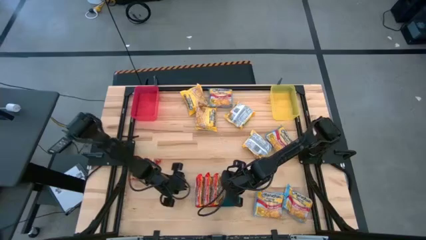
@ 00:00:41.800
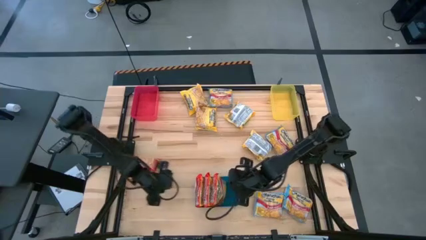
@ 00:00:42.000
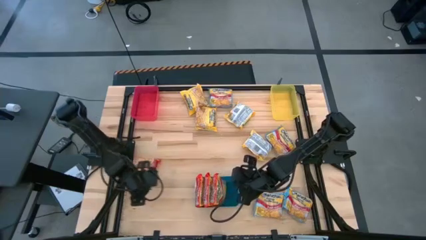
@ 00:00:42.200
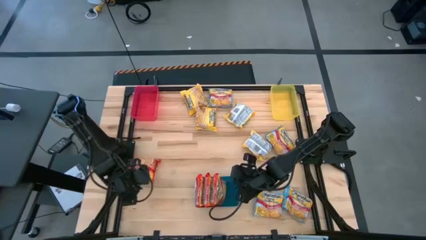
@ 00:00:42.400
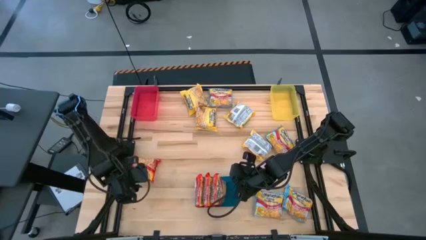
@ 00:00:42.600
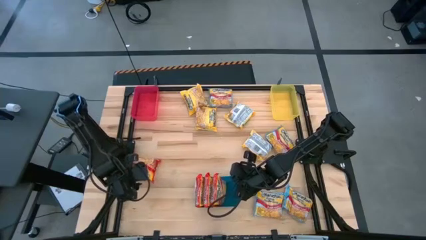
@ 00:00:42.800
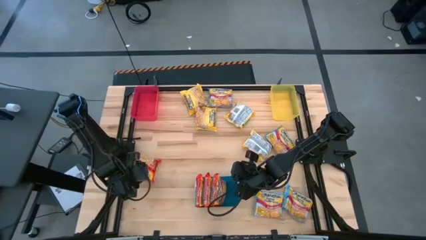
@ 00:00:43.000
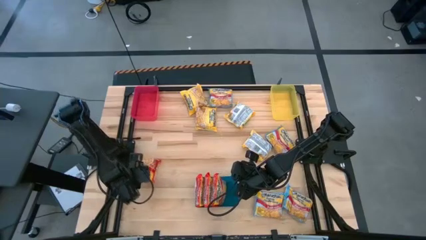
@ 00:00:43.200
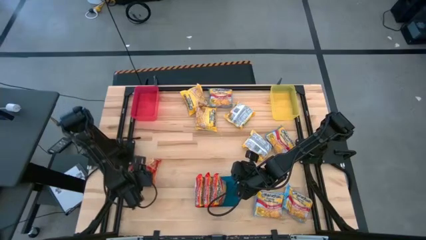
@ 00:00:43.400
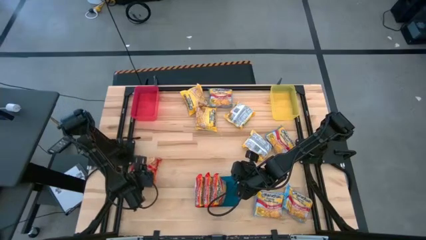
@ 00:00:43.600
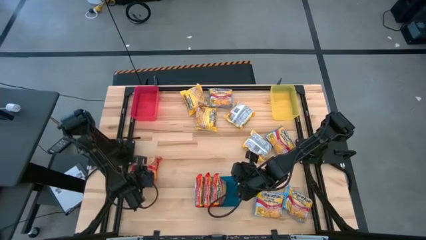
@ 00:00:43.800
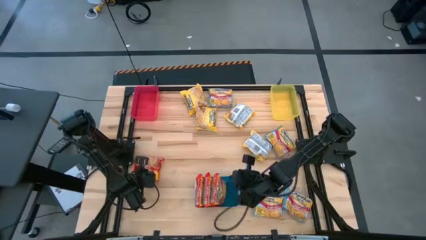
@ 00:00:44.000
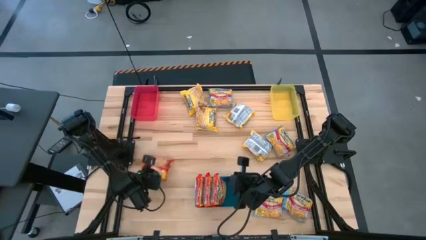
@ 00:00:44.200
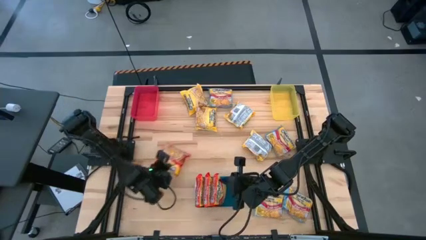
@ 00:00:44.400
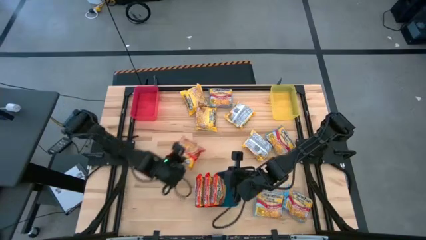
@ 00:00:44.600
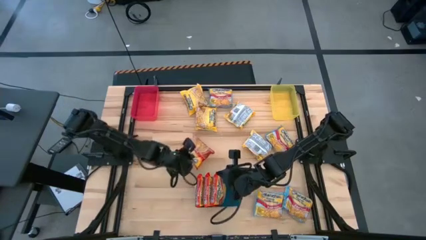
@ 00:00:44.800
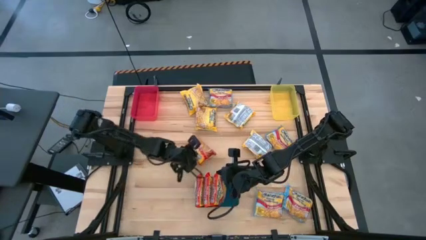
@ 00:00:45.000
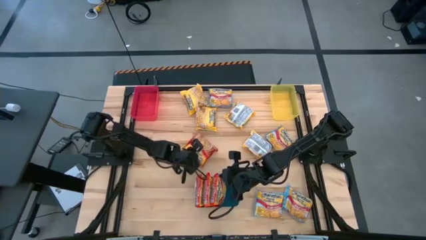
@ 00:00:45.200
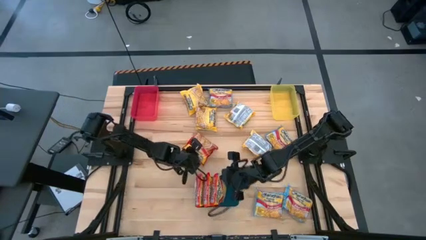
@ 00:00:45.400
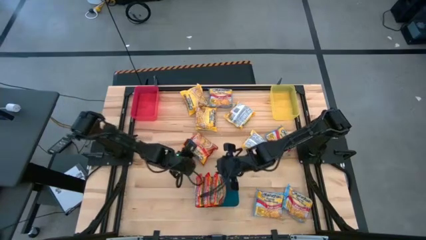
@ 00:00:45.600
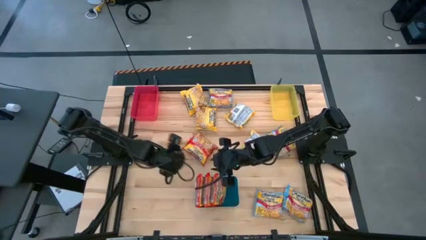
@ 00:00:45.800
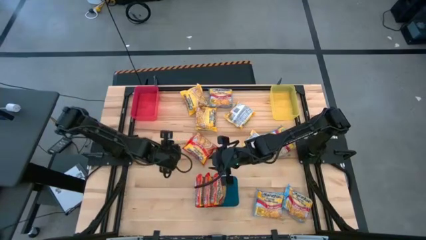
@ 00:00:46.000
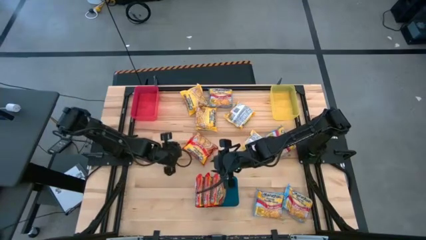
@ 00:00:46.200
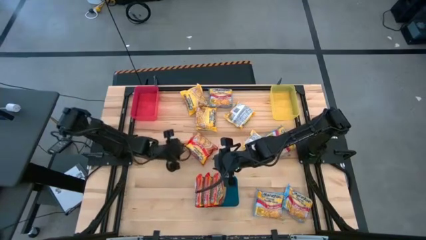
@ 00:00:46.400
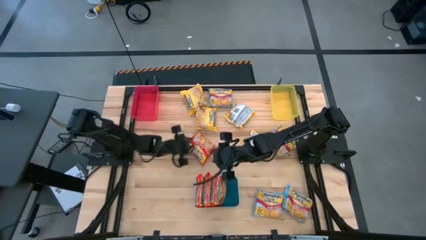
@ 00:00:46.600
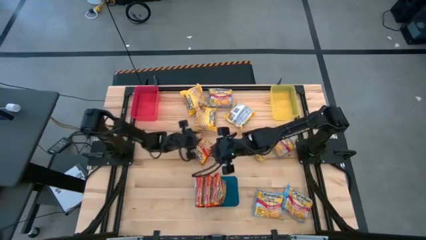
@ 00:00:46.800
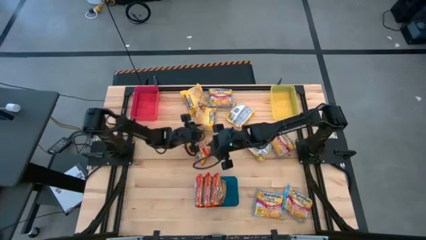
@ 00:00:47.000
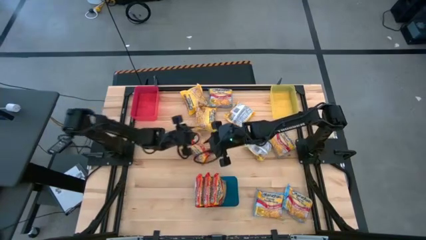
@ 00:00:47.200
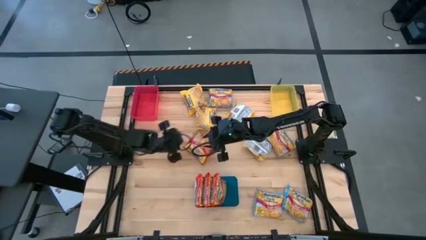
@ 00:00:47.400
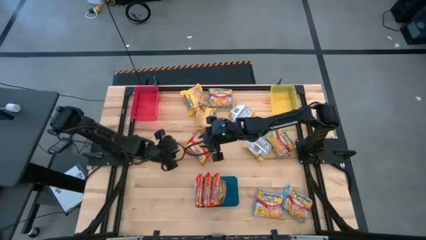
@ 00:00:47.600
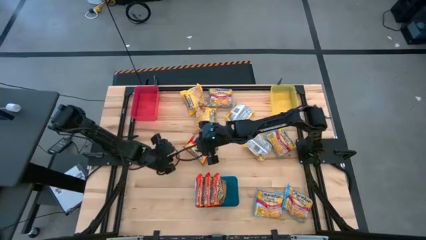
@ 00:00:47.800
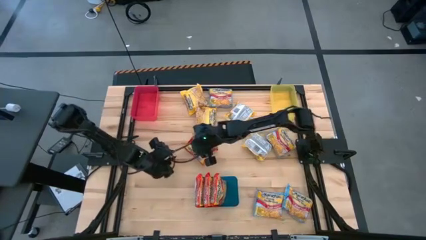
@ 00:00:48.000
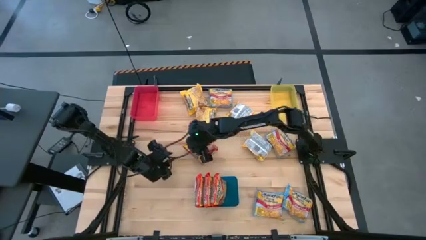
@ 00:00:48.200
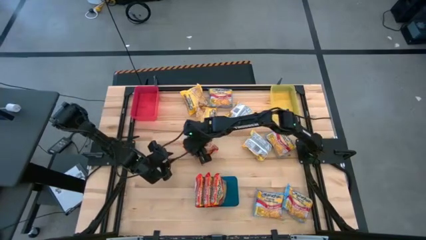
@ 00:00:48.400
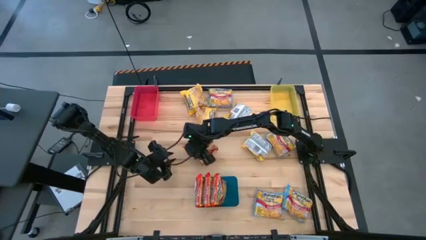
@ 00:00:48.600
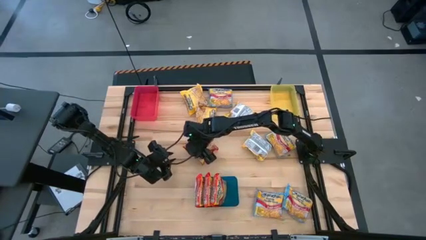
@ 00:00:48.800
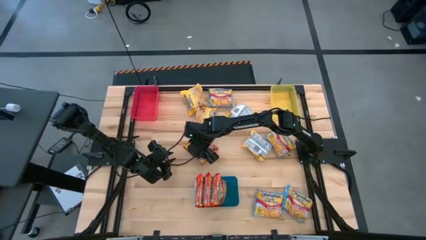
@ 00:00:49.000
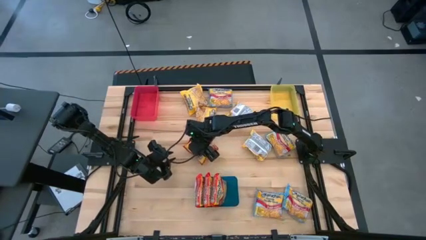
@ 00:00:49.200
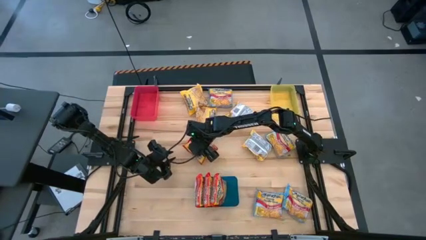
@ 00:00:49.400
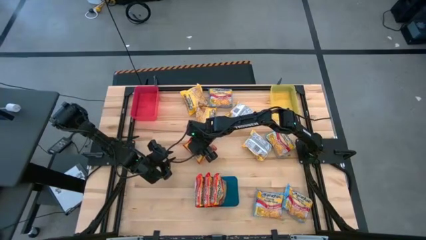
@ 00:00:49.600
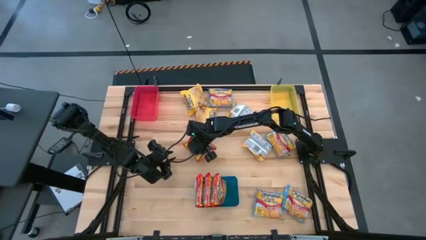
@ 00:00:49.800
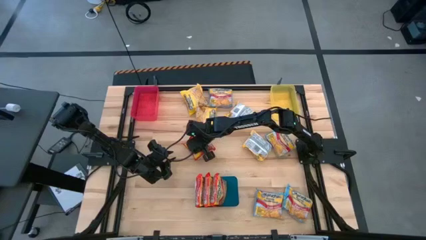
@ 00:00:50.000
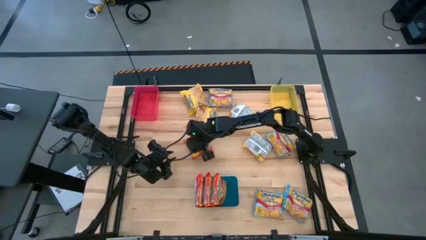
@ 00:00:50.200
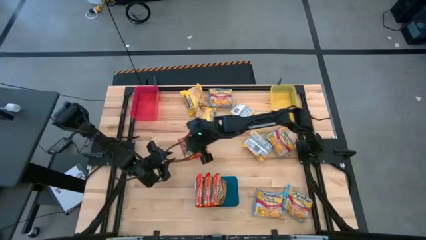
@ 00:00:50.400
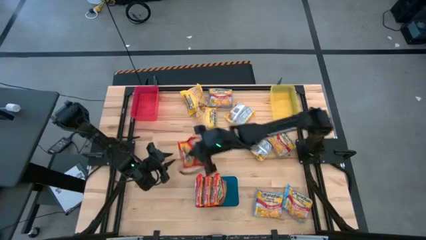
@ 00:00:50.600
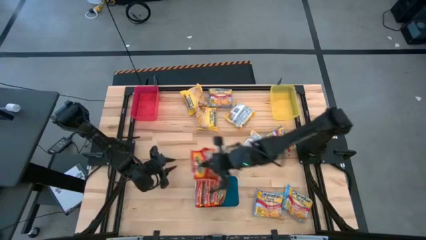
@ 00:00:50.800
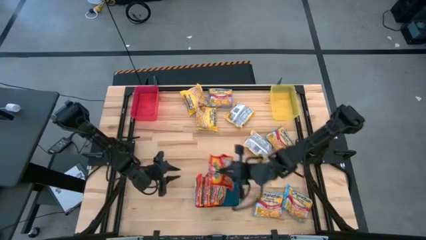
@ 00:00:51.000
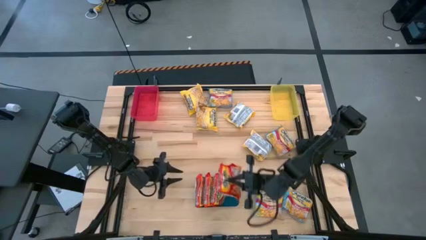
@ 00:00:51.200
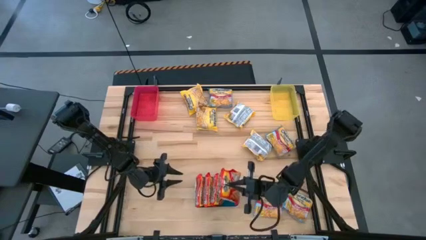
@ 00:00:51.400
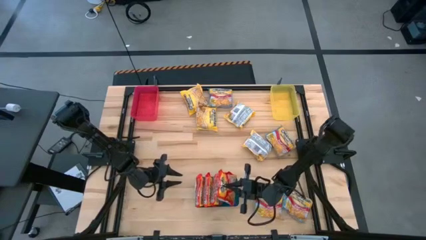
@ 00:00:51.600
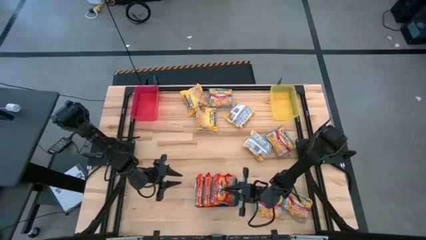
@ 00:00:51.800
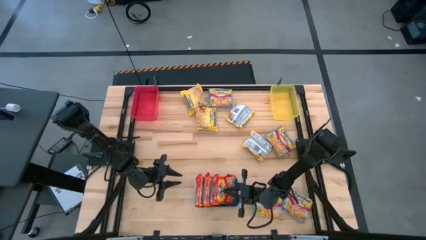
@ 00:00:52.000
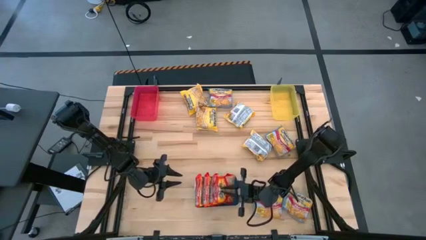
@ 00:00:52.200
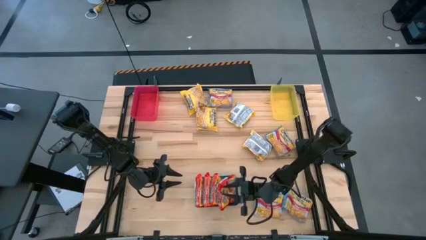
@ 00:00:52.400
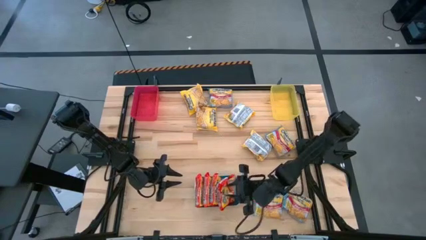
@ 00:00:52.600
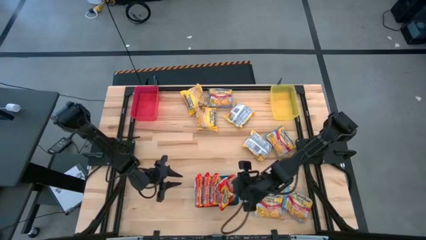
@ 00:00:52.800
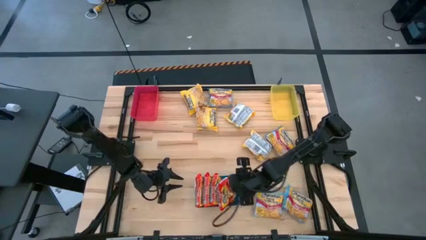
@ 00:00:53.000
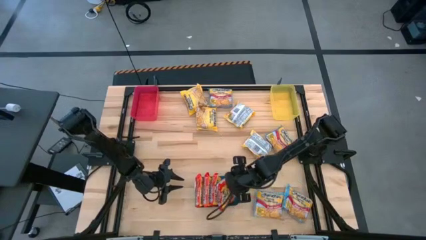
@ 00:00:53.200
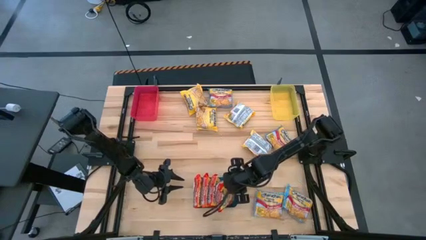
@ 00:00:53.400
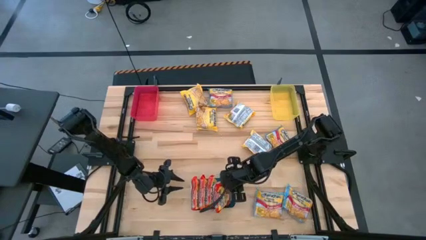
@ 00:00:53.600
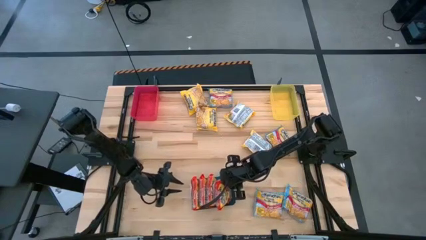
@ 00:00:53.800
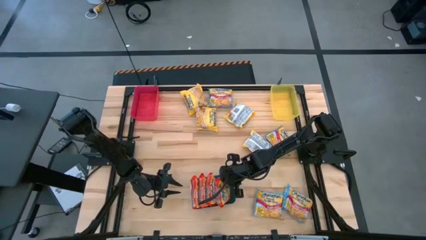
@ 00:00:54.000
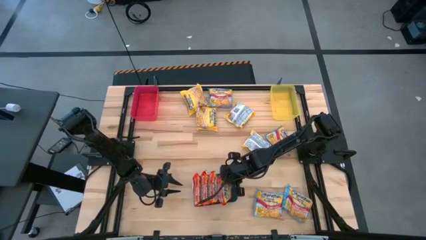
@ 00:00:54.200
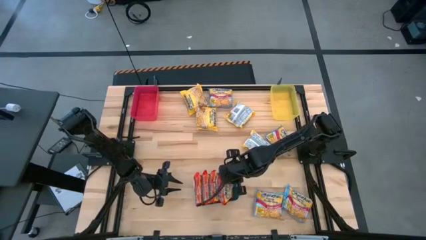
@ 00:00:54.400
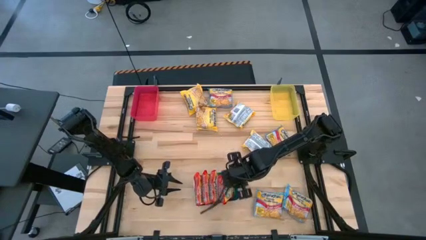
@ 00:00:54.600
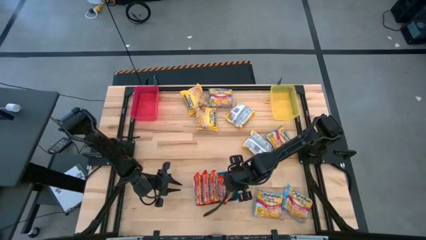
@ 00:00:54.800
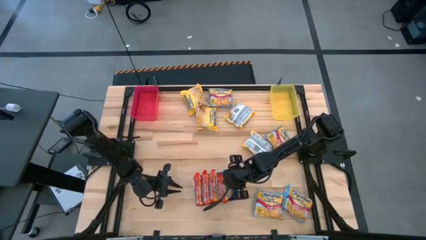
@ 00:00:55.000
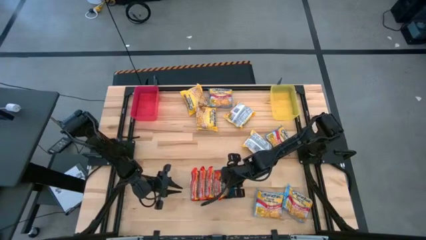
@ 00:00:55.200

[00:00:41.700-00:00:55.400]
Task: Sort Maruchan noodles
Put the red noodle pack into the blue bin
